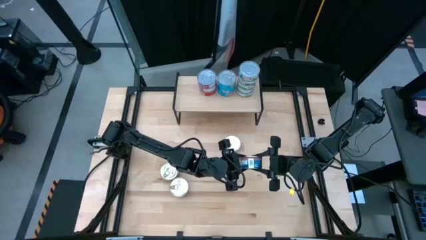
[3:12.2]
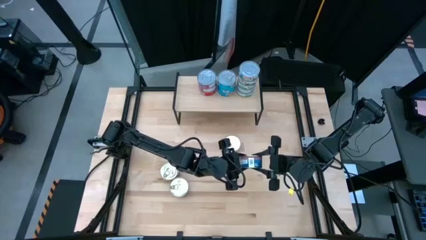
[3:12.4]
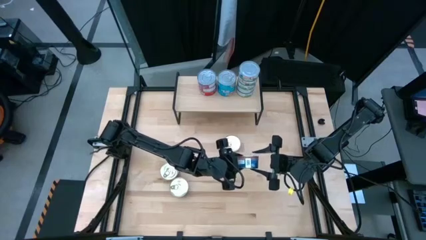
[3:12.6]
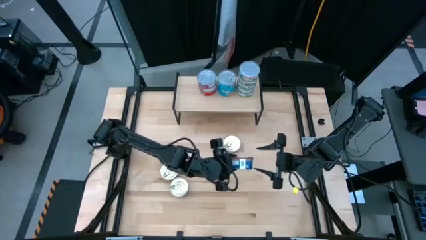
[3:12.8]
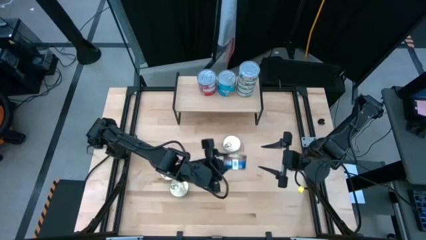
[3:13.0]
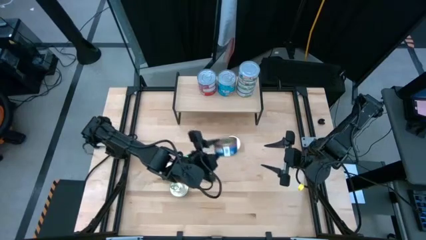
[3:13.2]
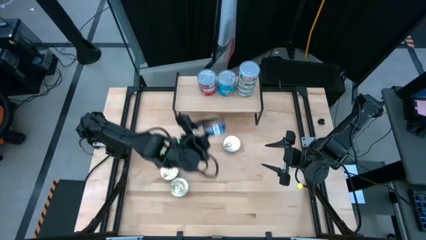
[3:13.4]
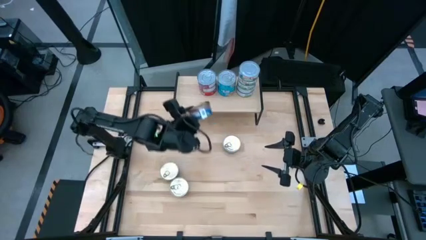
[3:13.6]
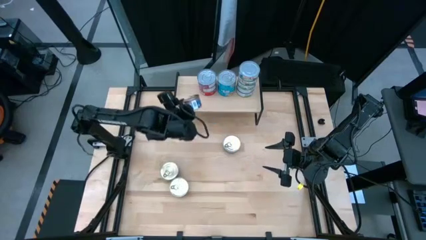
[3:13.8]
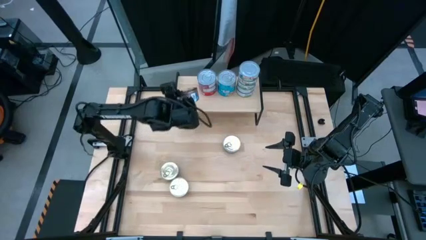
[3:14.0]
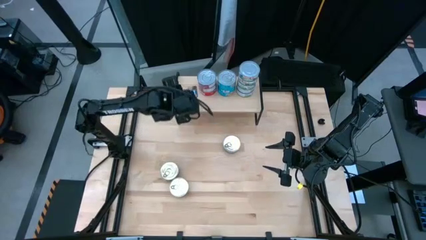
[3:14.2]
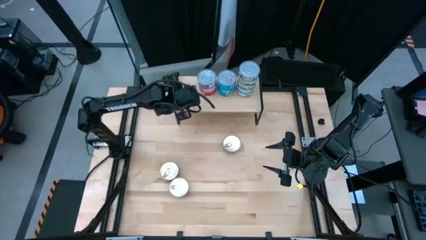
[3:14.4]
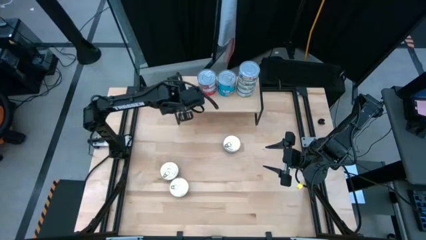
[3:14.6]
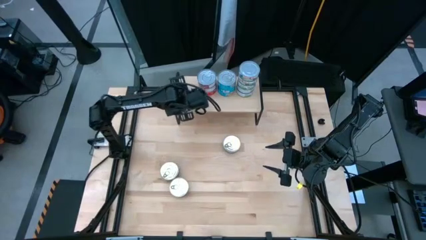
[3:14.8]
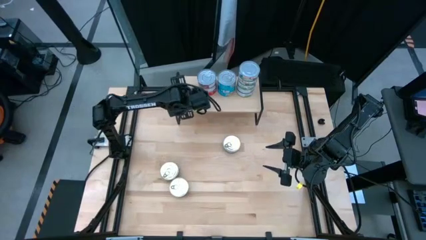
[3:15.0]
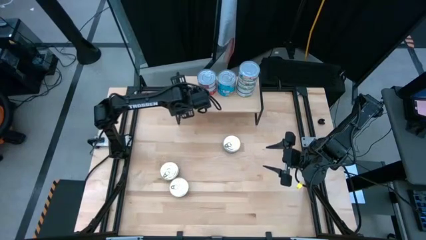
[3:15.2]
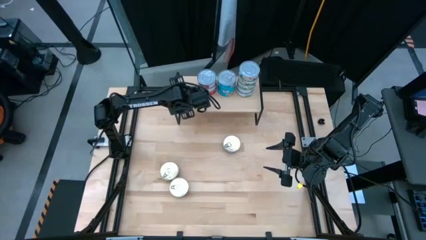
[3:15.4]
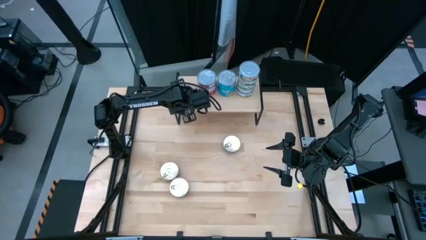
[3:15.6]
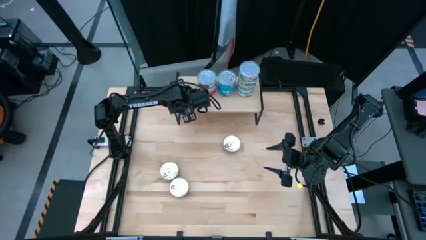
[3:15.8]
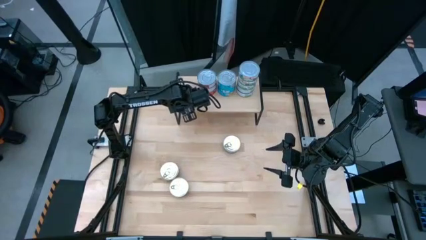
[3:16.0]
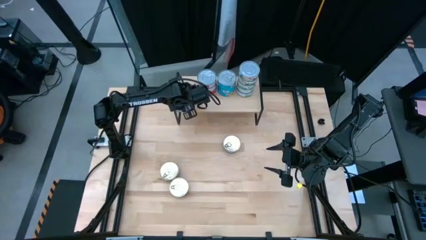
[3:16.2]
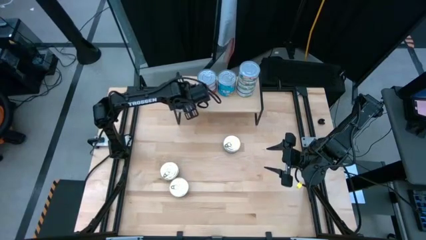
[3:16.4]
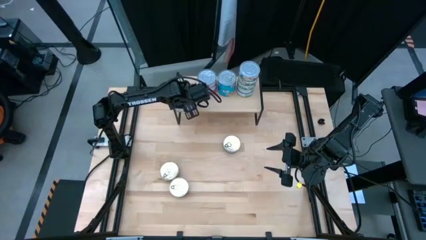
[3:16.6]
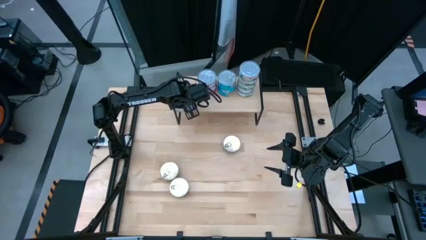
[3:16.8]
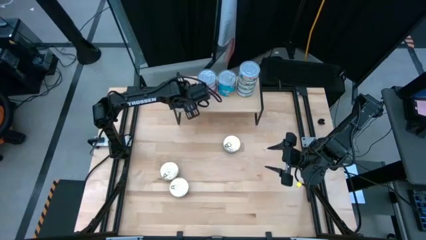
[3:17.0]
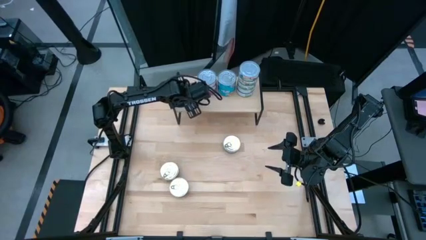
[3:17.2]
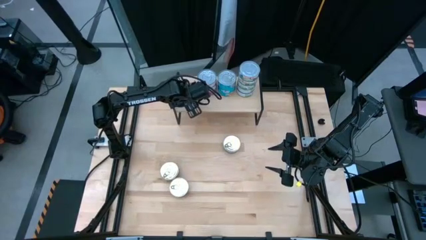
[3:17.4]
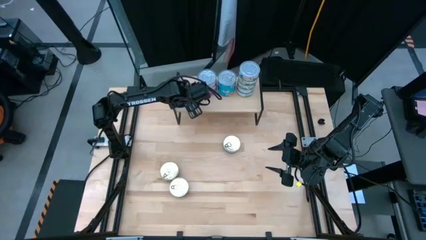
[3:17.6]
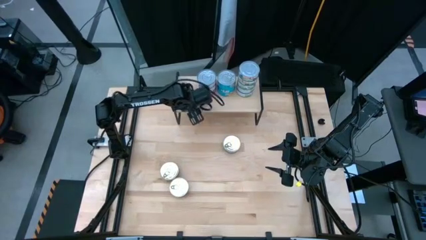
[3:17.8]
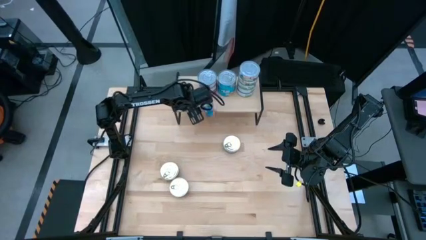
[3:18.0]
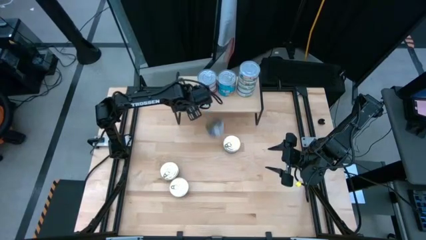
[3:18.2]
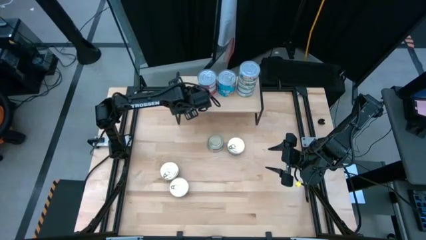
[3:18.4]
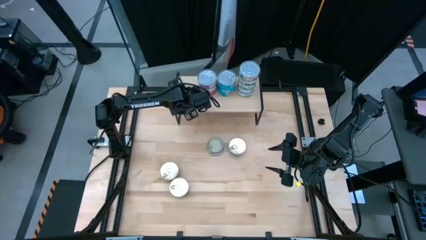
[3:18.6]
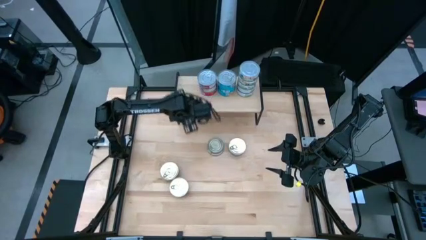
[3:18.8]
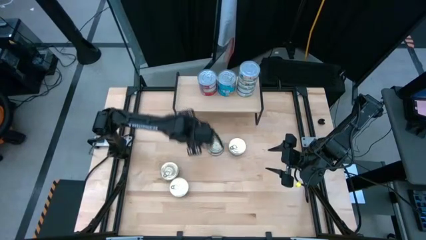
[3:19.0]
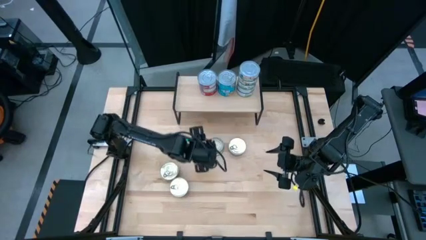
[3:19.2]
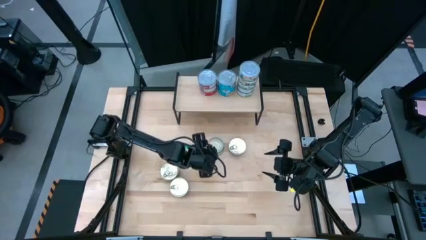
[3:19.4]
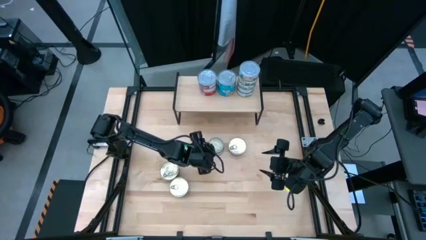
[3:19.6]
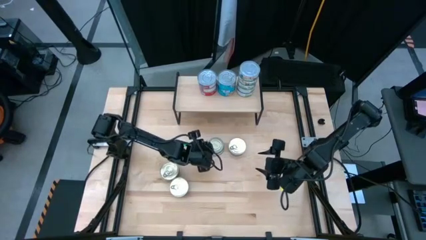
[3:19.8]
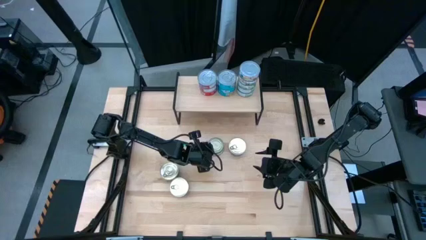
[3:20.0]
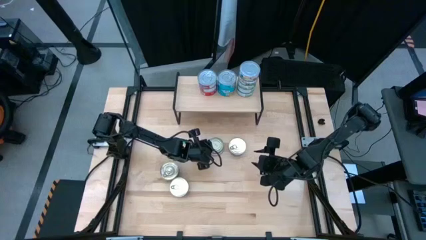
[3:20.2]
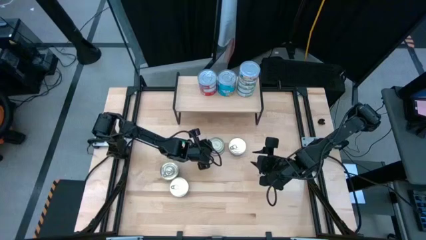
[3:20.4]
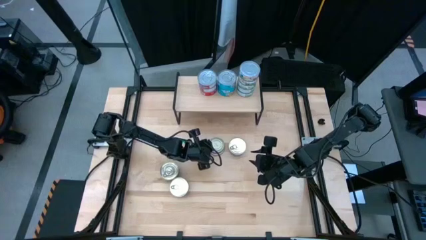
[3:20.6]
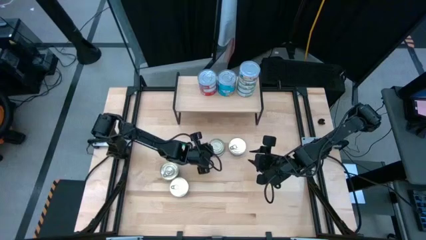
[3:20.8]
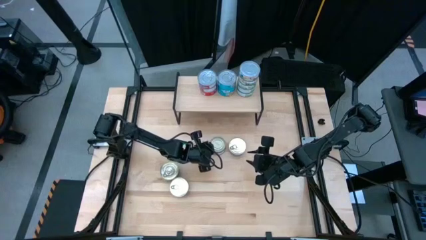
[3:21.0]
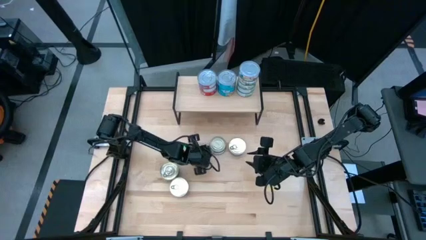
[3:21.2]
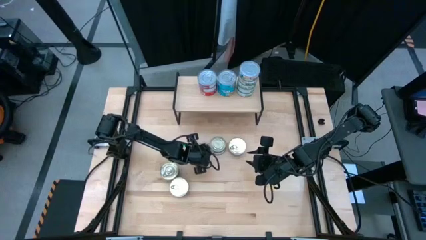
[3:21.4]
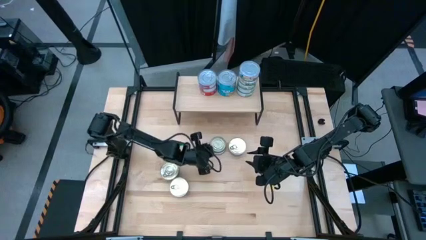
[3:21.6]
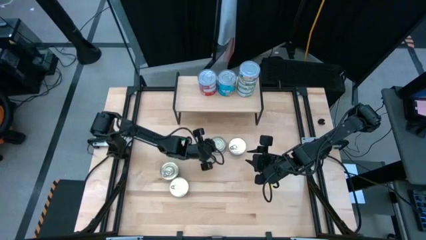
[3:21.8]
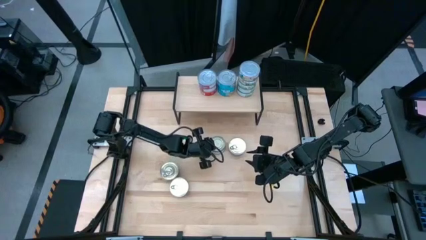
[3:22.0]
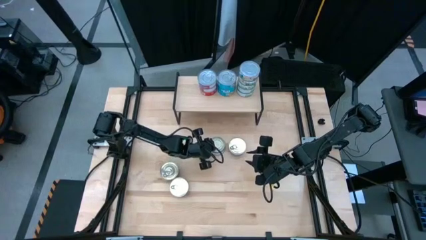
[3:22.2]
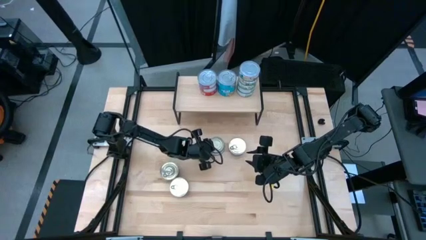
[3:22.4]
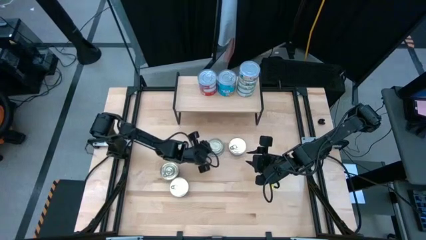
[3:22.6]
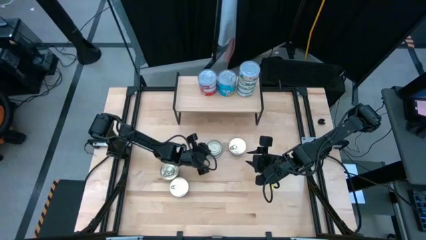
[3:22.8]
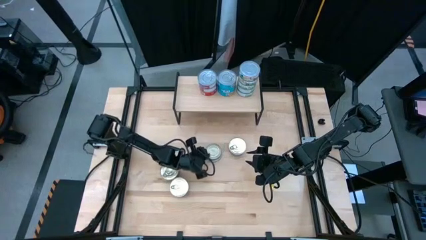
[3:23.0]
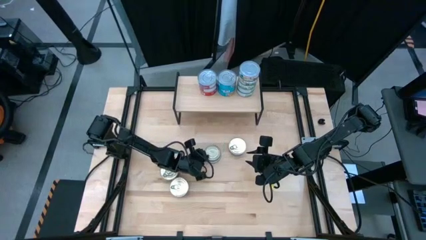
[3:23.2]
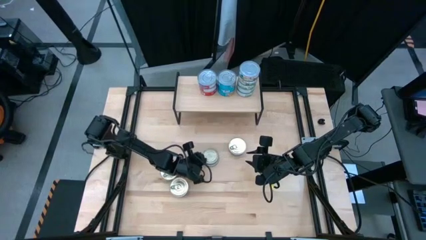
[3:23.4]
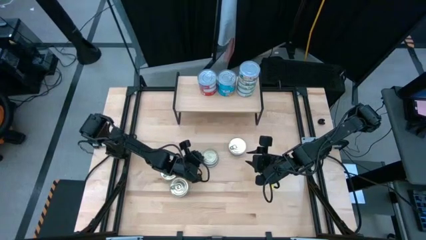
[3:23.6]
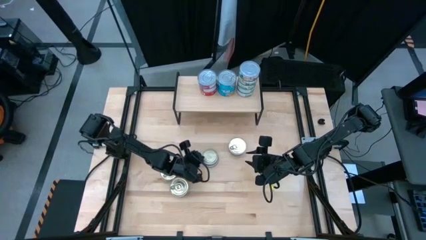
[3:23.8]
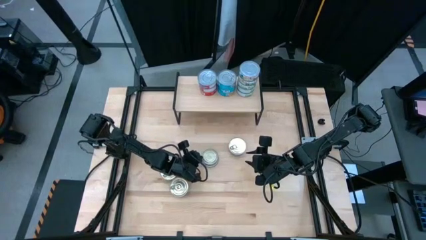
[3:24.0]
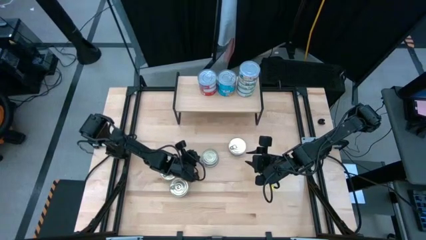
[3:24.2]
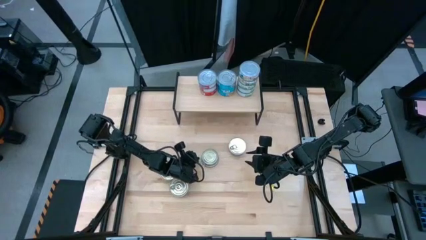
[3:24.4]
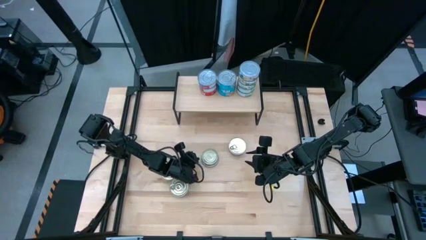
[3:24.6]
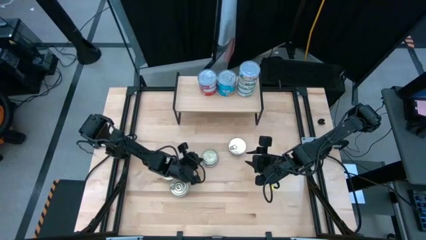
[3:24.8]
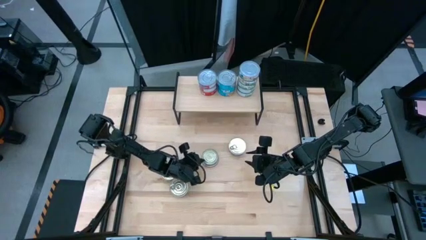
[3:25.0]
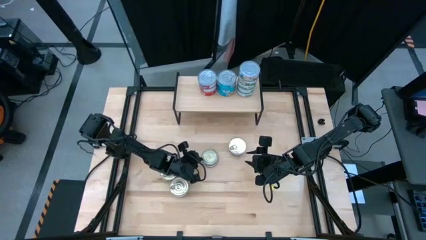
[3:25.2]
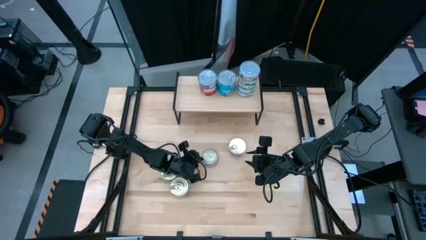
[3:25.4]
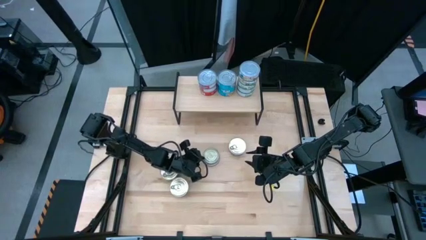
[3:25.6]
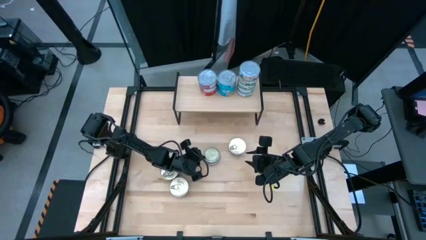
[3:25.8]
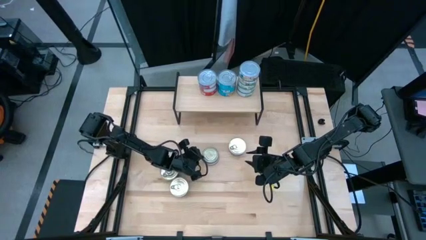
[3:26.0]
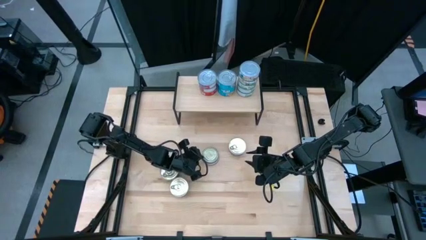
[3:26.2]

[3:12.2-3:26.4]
Task: Stack canned seafood by type on shelf
Put the blue pink tuna can on the shelf
